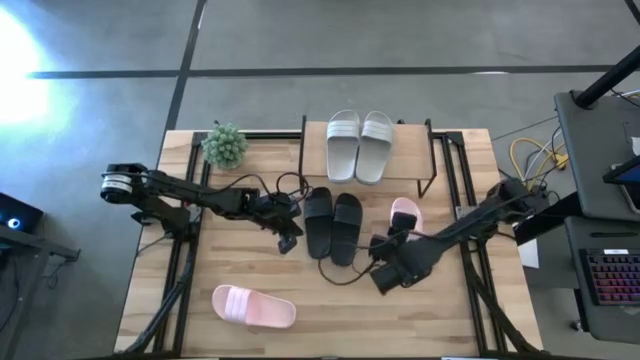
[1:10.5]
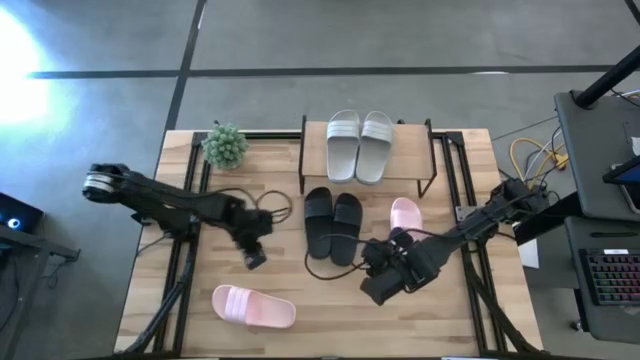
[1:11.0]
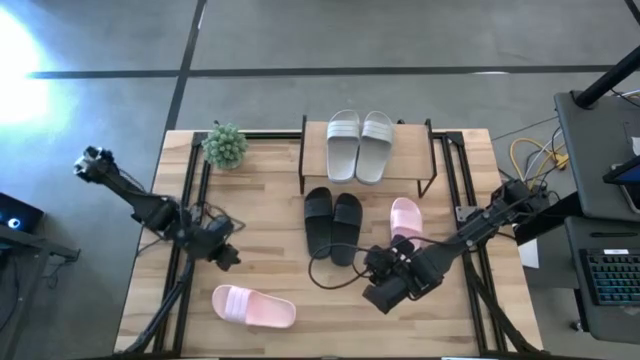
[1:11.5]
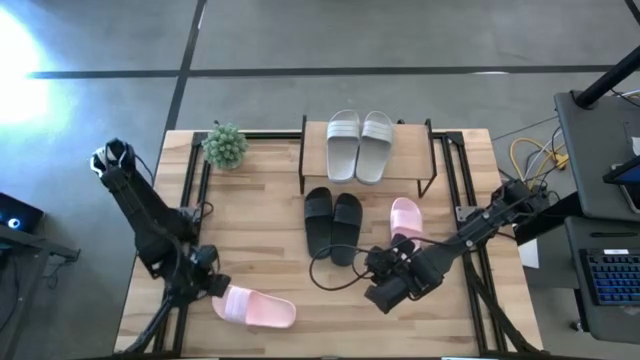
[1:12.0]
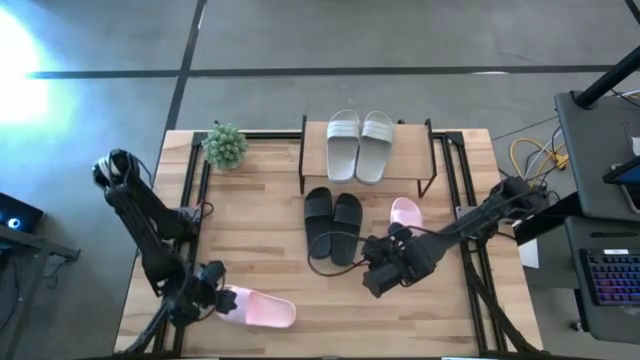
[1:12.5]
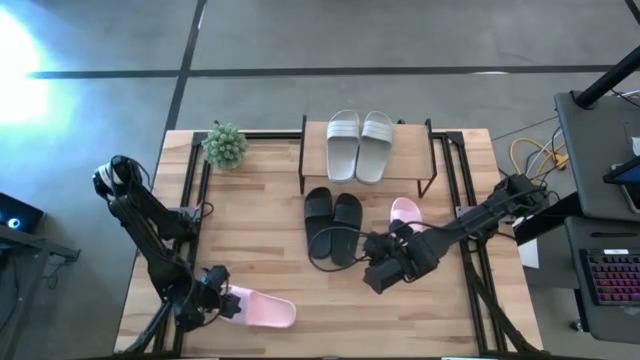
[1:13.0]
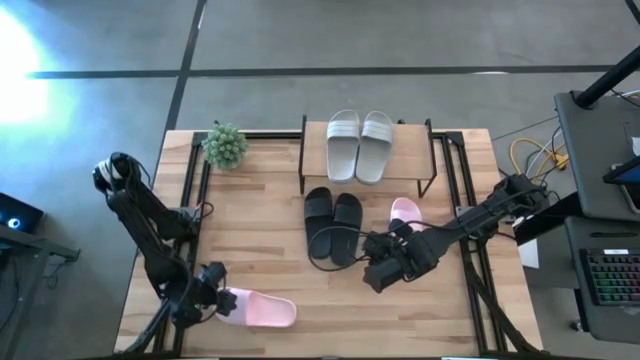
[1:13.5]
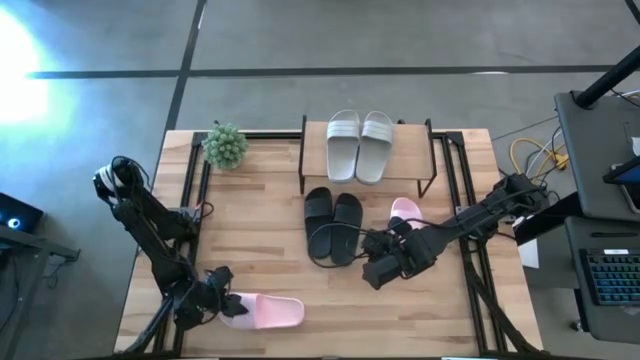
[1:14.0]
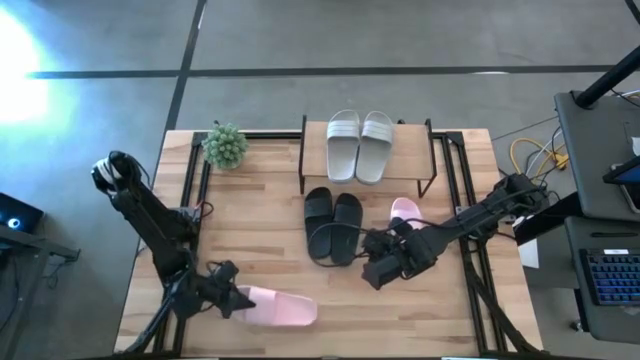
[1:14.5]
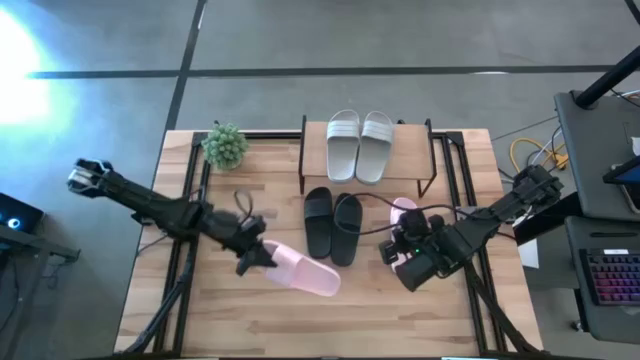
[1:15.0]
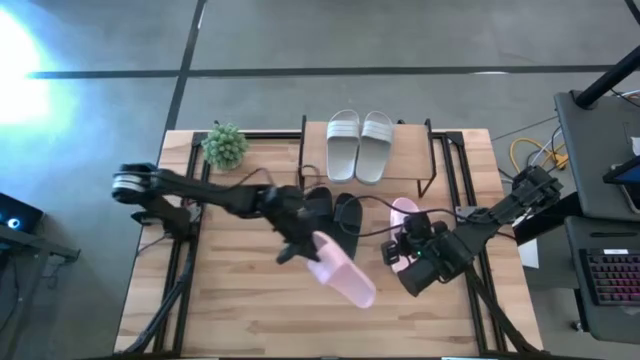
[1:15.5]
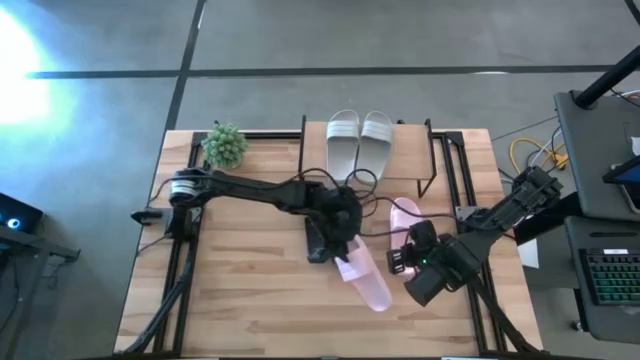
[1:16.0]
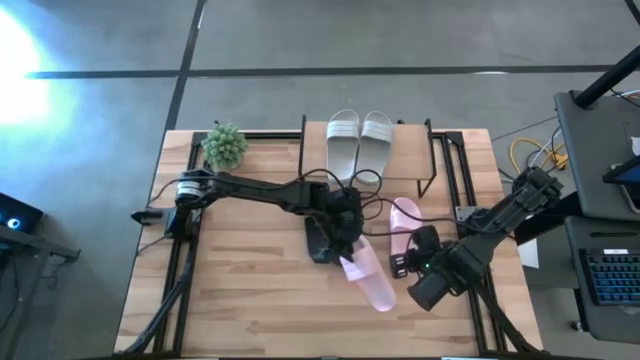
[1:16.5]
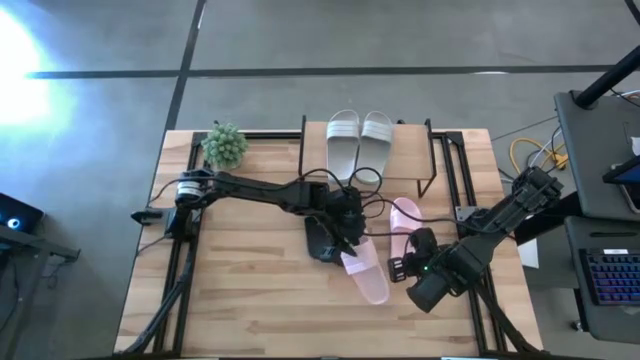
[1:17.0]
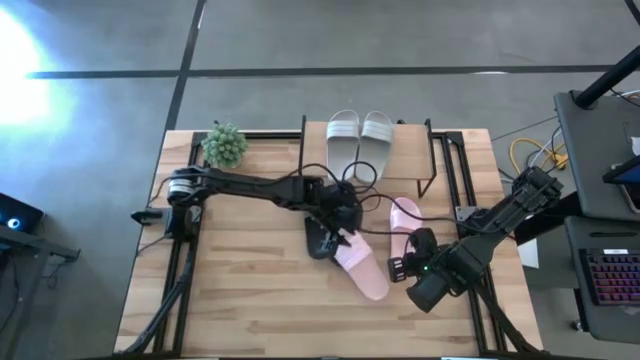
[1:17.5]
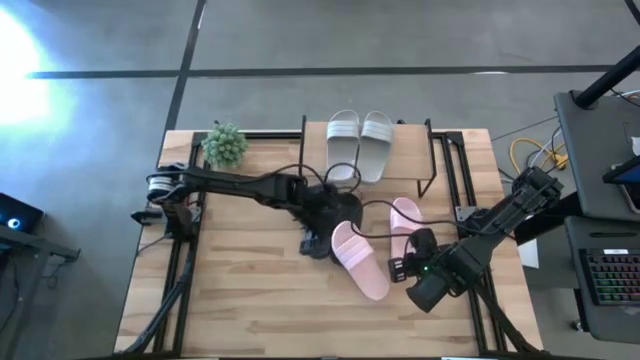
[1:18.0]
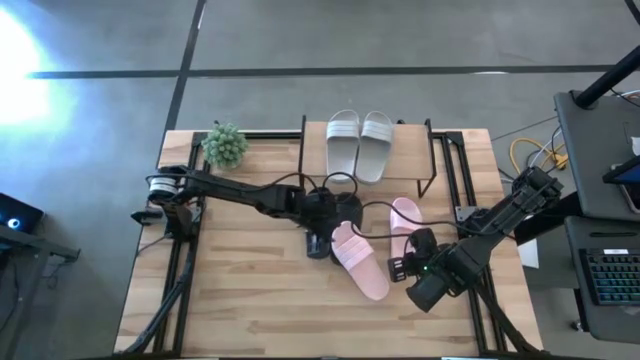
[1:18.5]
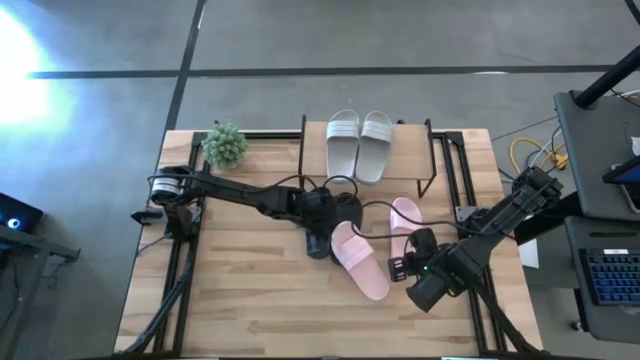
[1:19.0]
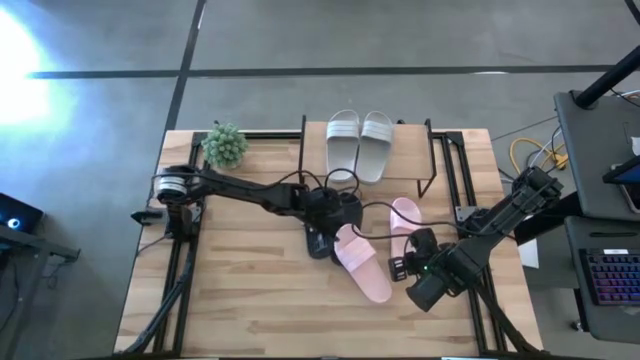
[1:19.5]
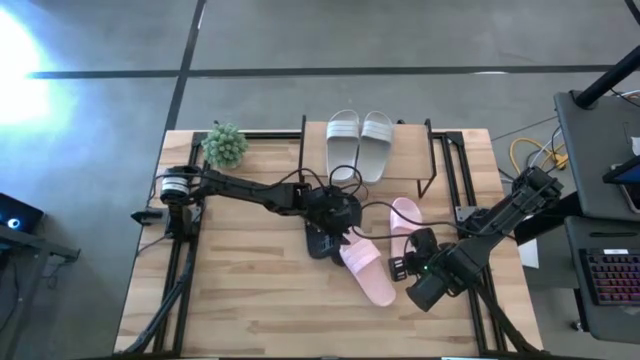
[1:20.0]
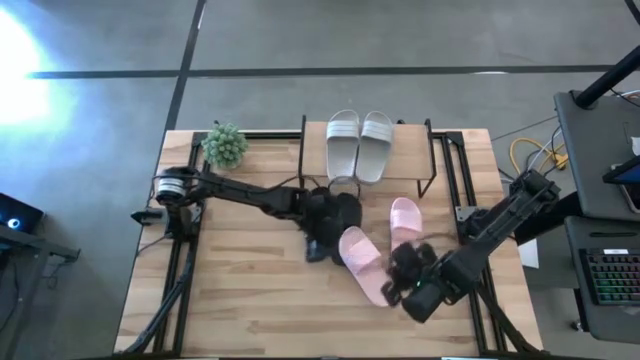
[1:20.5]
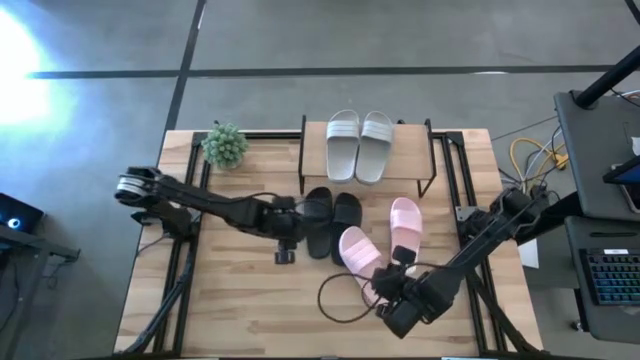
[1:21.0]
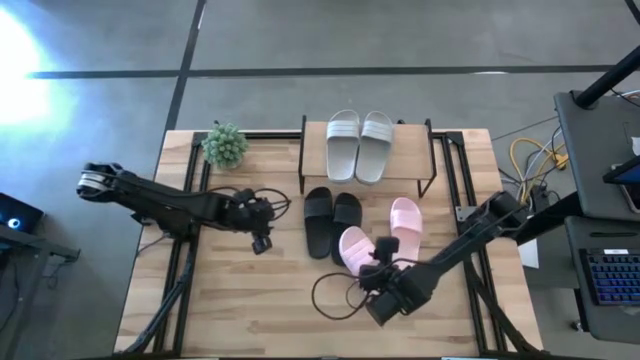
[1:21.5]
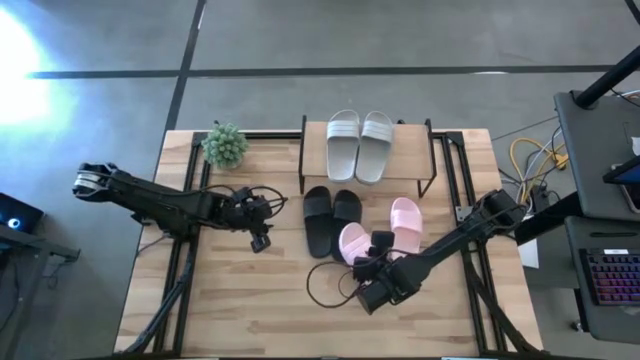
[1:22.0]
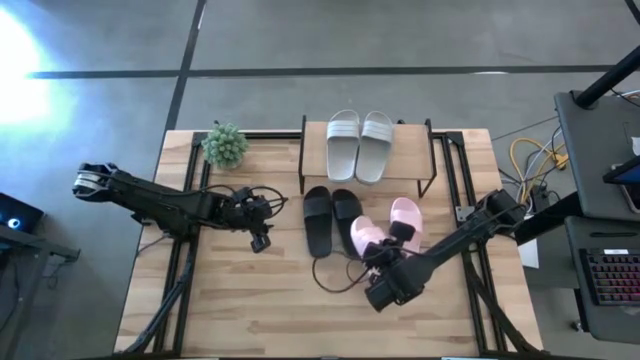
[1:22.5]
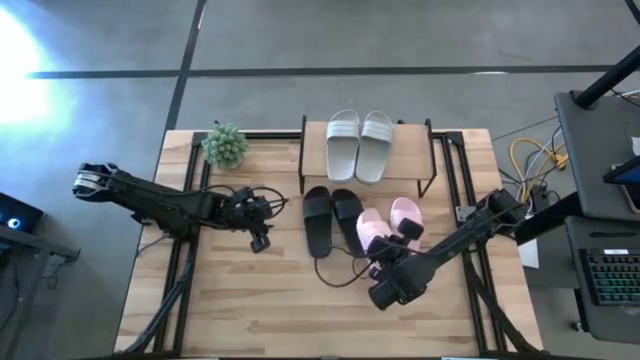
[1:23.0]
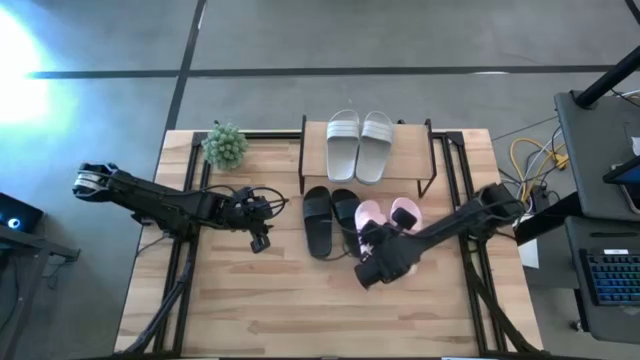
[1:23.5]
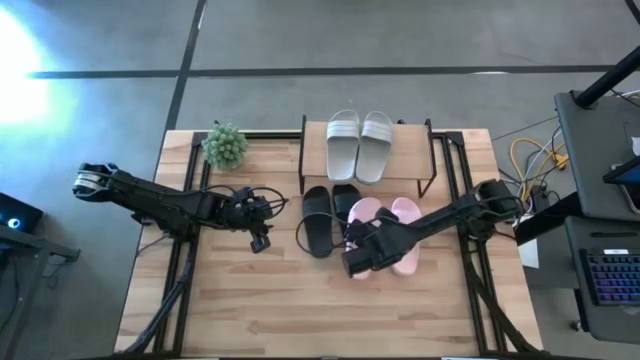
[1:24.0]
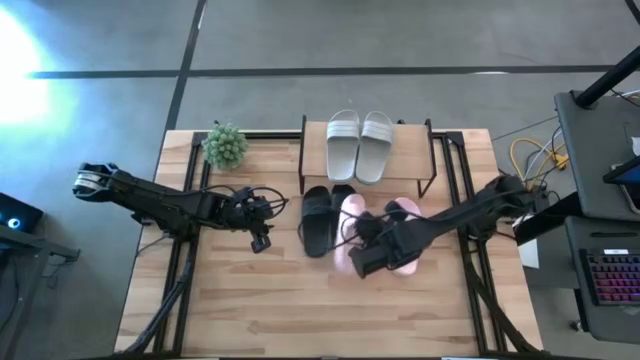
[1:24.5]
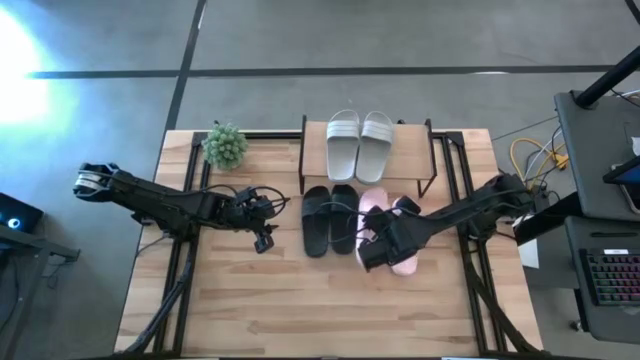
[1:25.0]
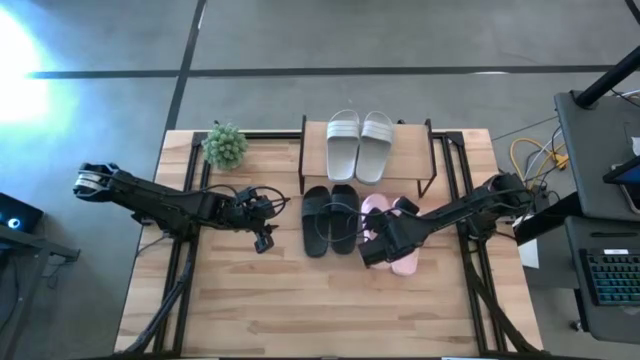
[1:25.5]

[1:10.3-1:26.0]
Task: Pick and place slides into the shelf
Move the left pink slipper to the top right of the table

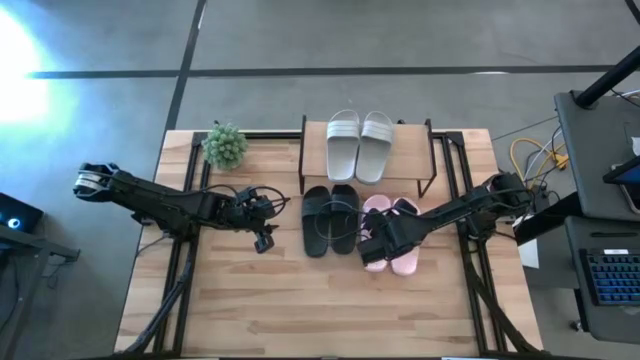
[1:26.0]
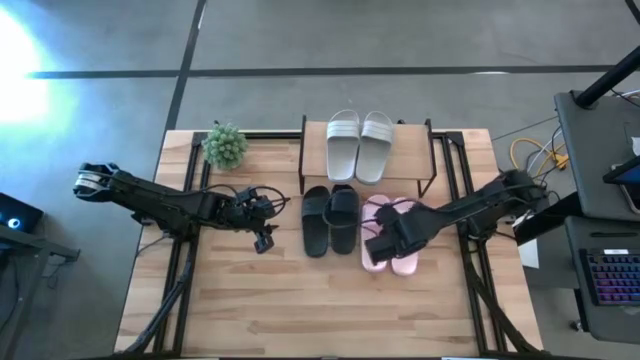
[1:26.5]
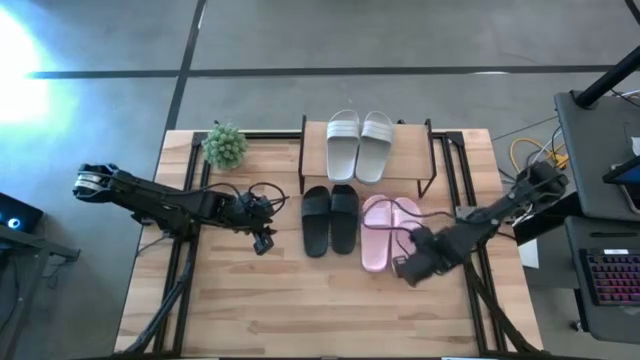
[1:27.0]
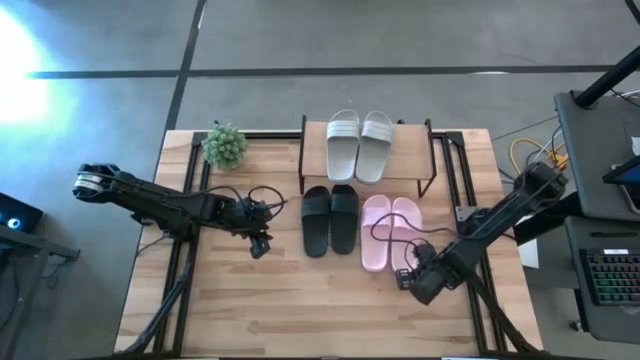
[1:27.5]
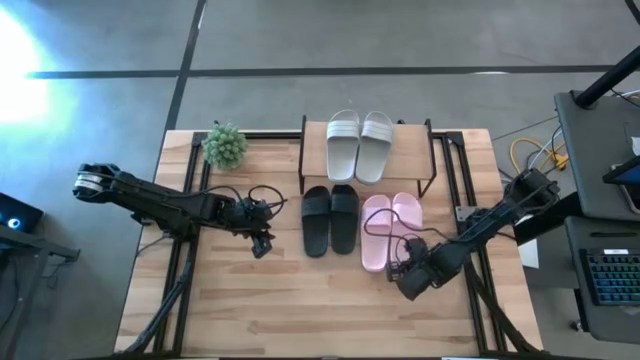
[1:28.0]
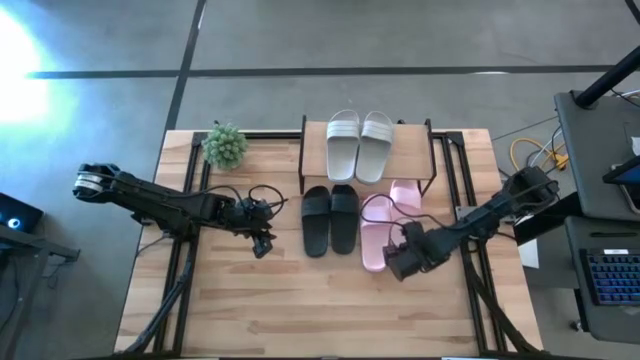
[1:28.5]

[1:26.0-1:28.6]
Adjust the right pink slipper under the shelf

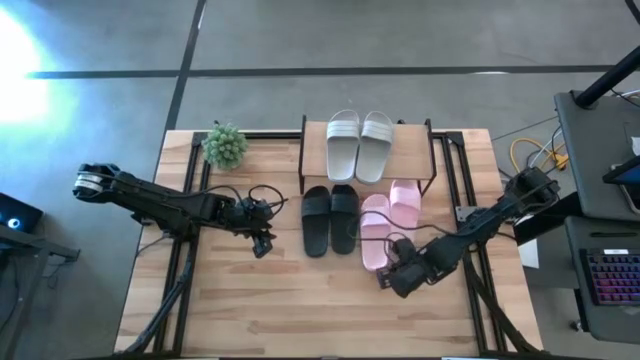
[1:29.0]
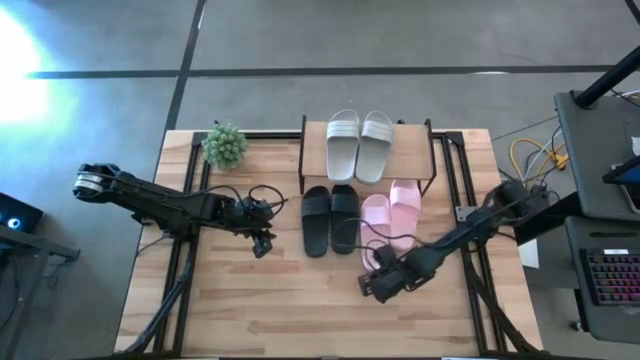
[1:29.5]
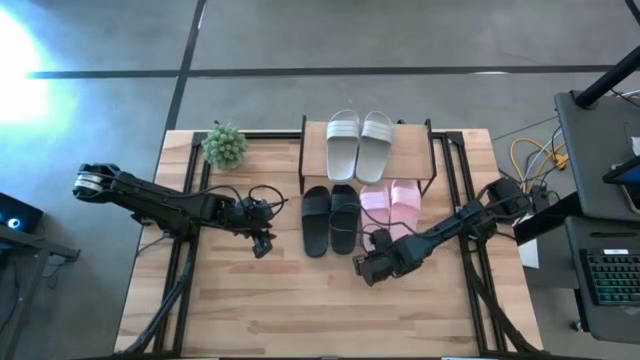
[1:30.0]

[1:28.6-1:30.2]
Adjust the left pink slipper under the shelf

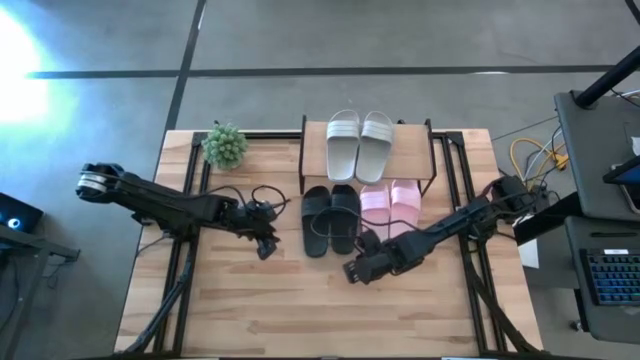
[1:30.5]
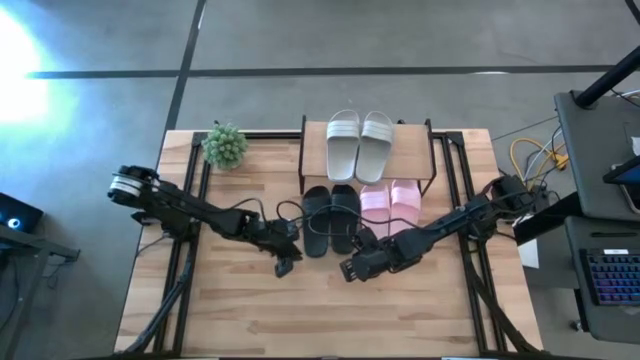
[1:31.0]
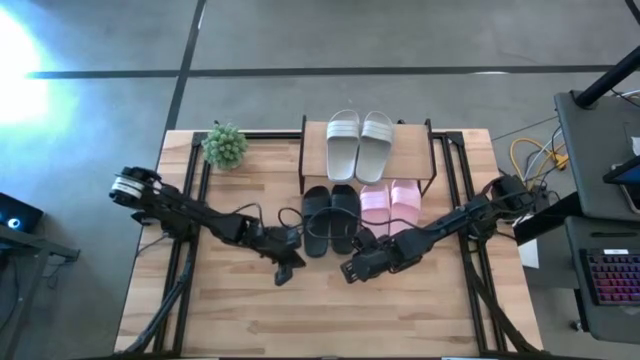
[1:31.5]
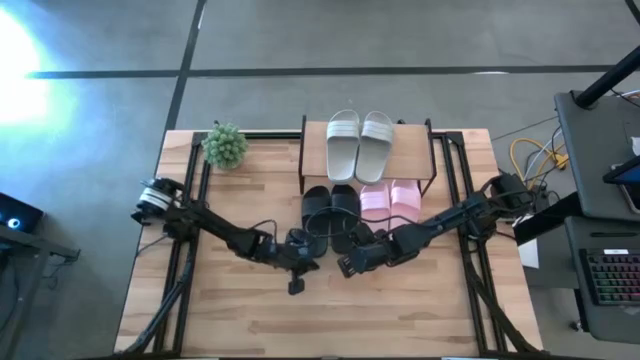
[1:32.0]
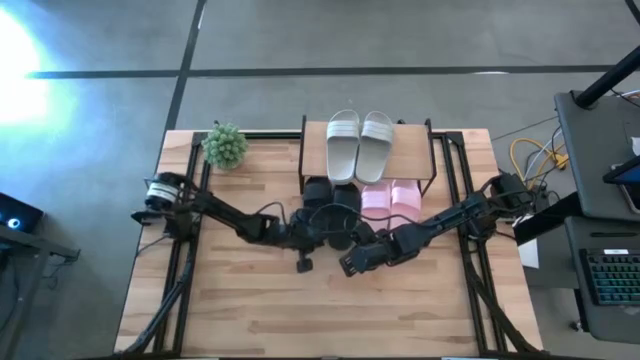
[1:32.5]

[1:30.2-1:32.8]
Adjust the left black slipper under the shelf

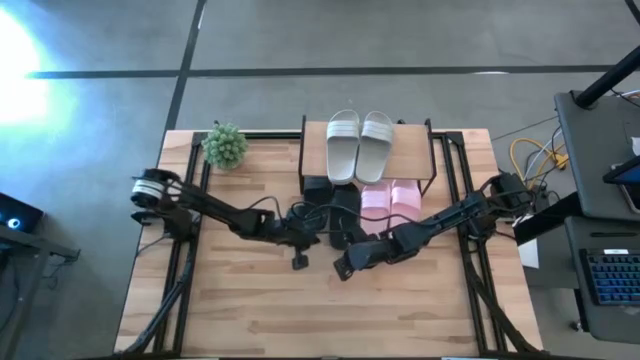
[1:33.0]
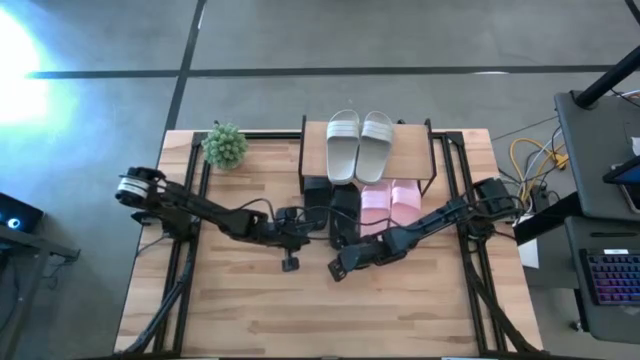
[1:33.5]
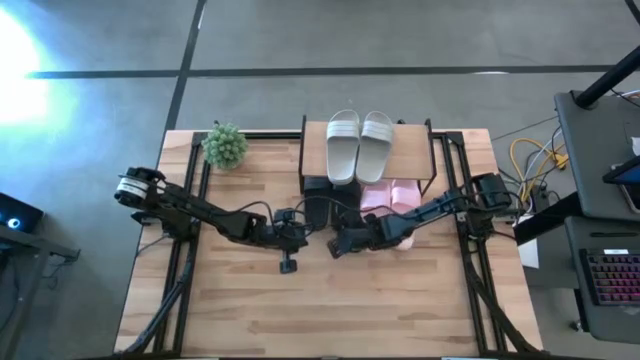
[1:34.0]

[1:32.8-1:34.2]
Adjust the right black slipper under the shelf
